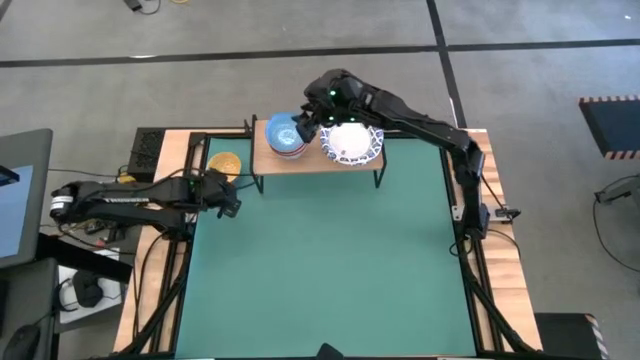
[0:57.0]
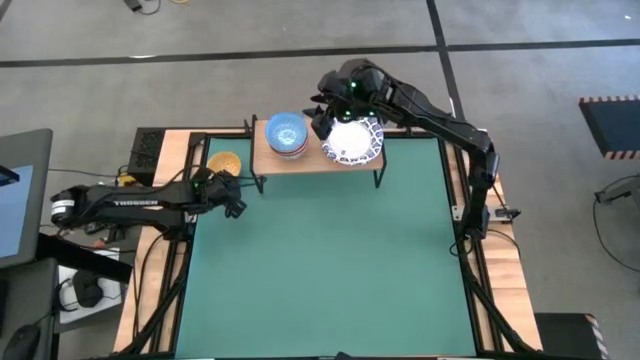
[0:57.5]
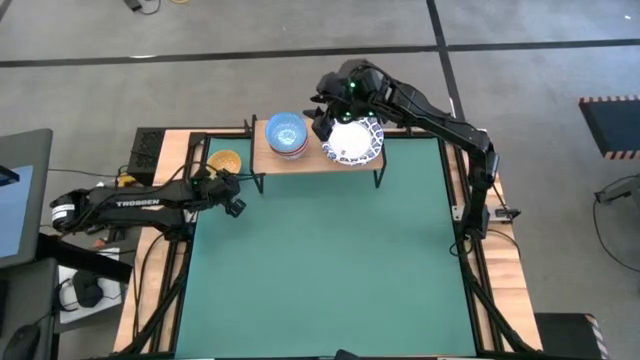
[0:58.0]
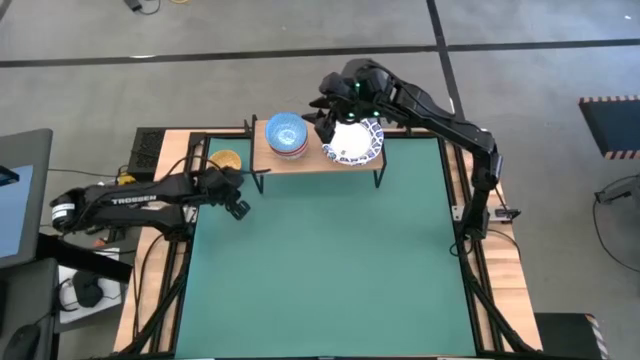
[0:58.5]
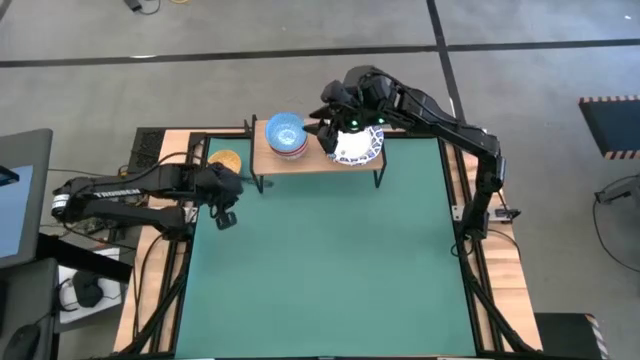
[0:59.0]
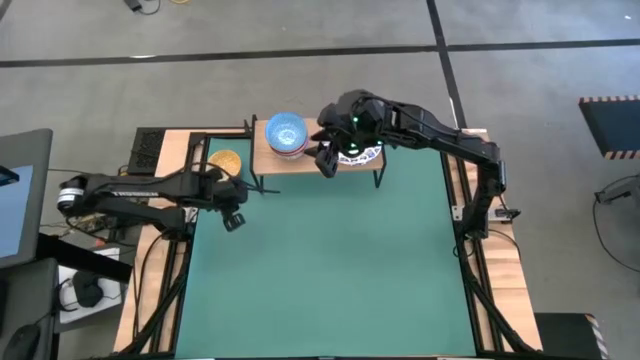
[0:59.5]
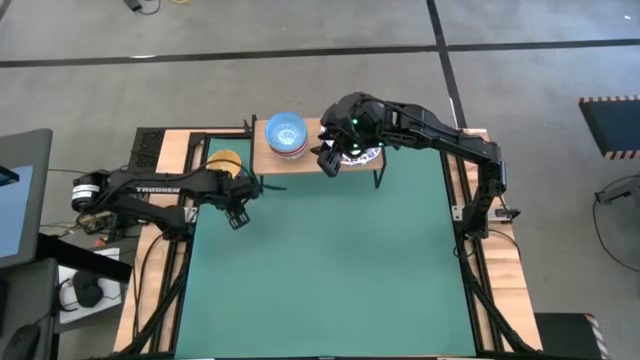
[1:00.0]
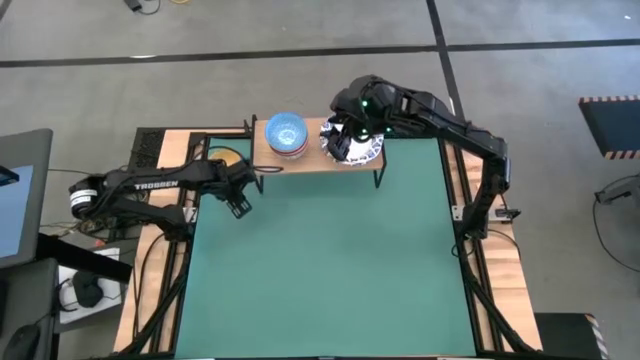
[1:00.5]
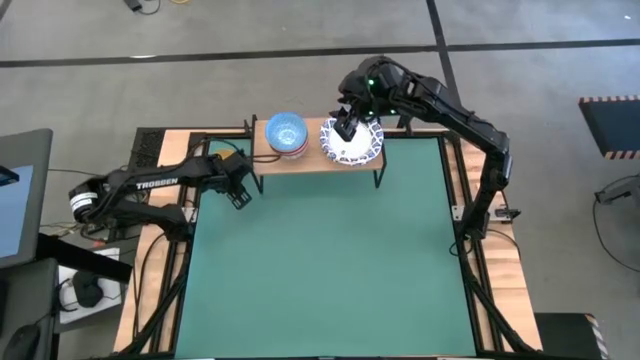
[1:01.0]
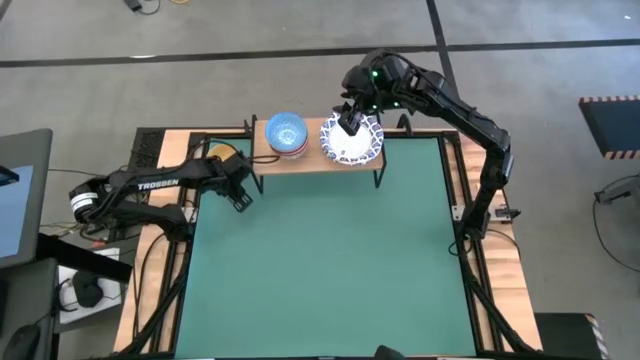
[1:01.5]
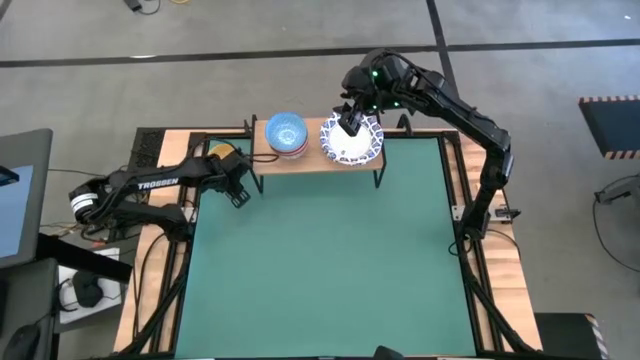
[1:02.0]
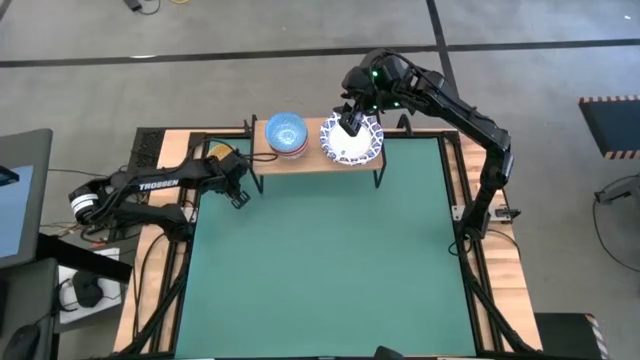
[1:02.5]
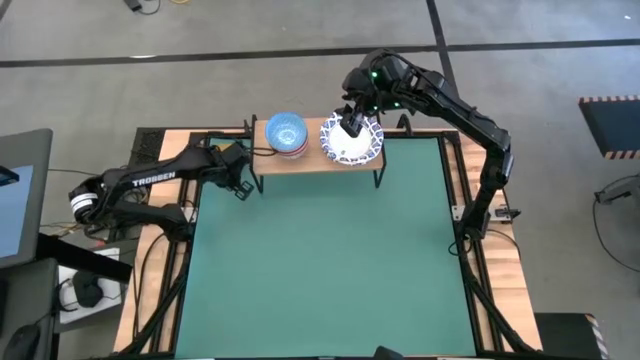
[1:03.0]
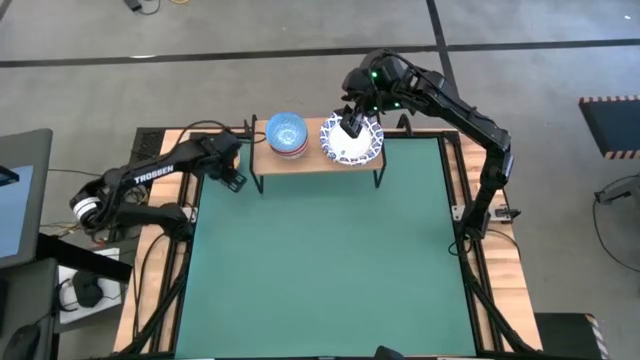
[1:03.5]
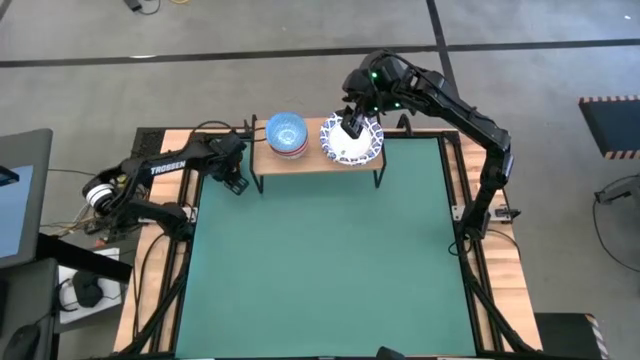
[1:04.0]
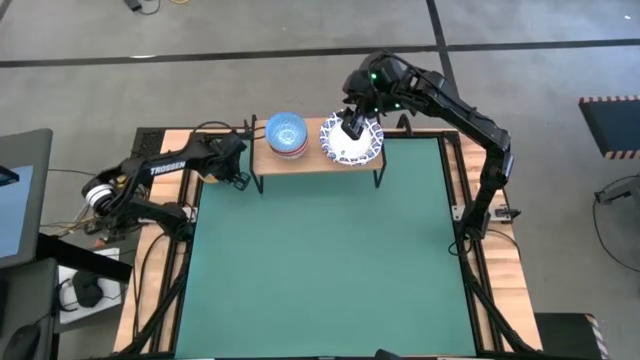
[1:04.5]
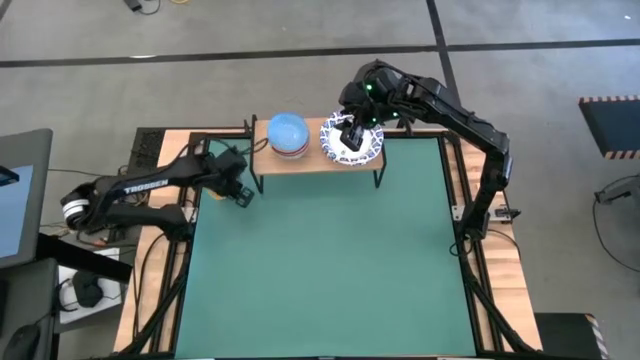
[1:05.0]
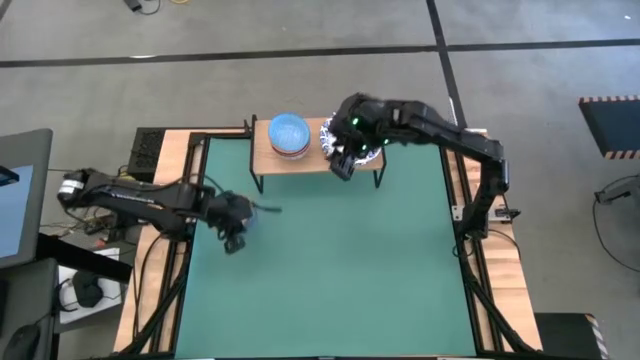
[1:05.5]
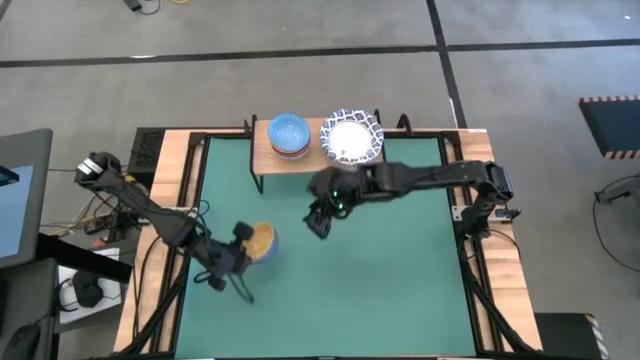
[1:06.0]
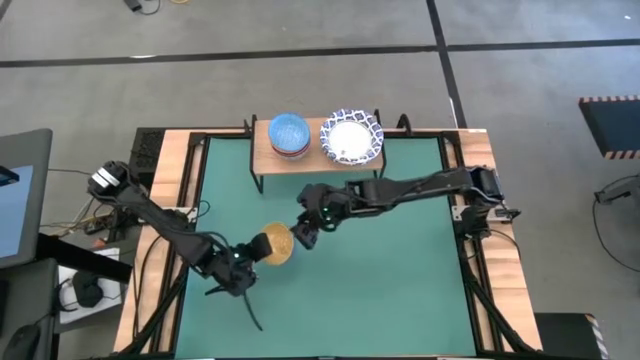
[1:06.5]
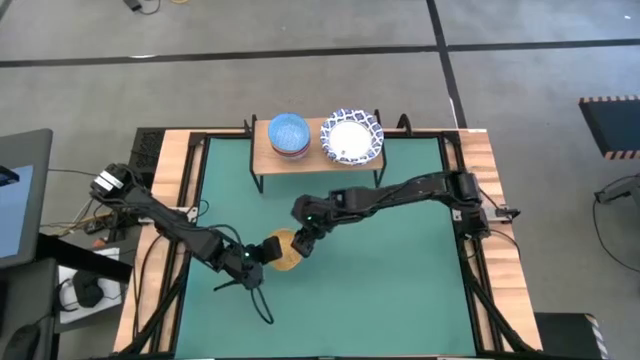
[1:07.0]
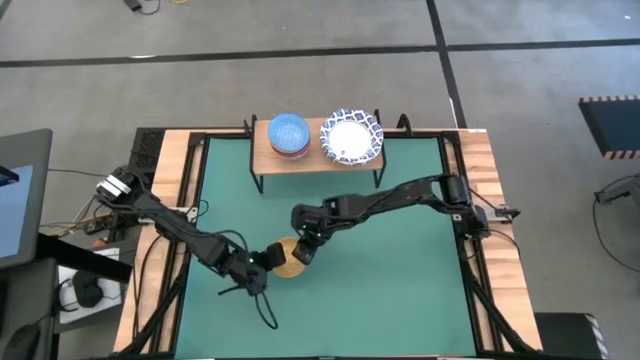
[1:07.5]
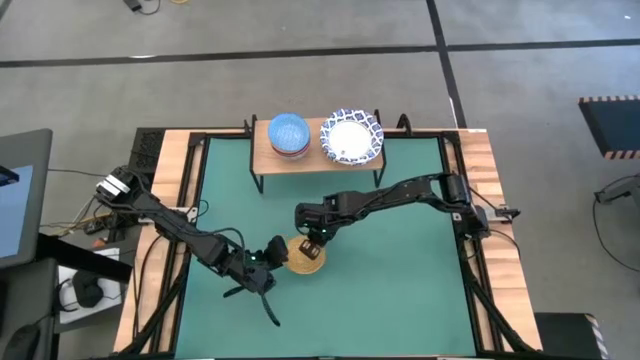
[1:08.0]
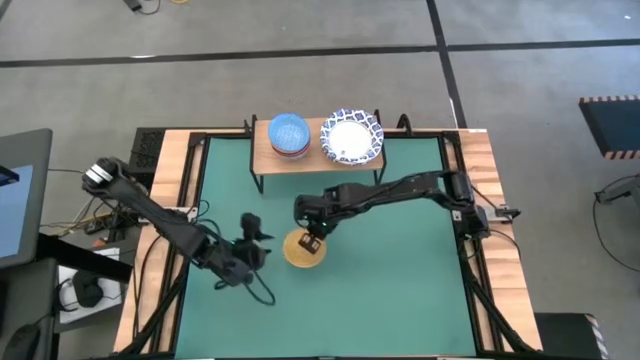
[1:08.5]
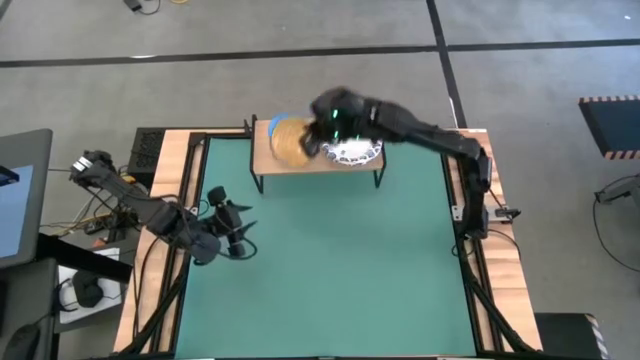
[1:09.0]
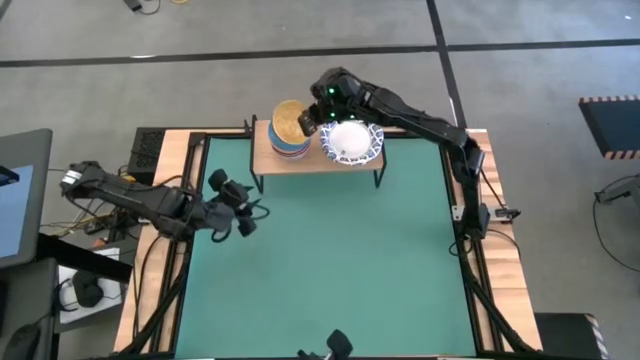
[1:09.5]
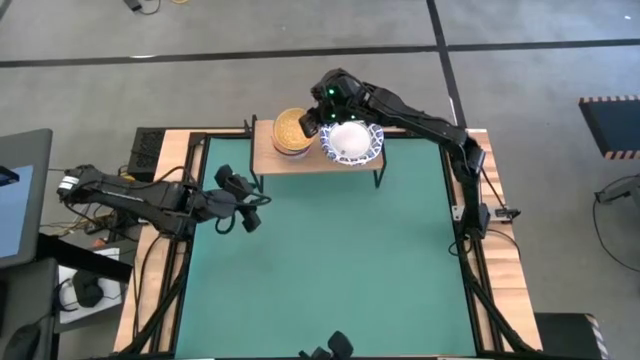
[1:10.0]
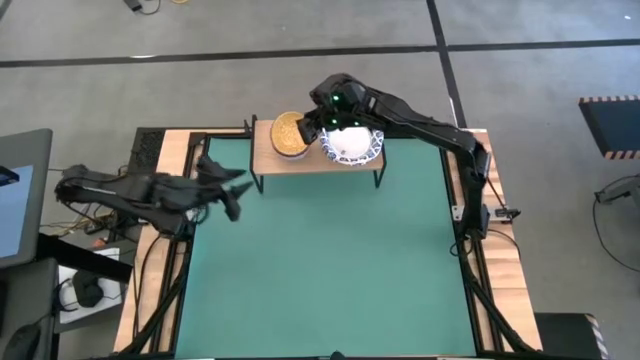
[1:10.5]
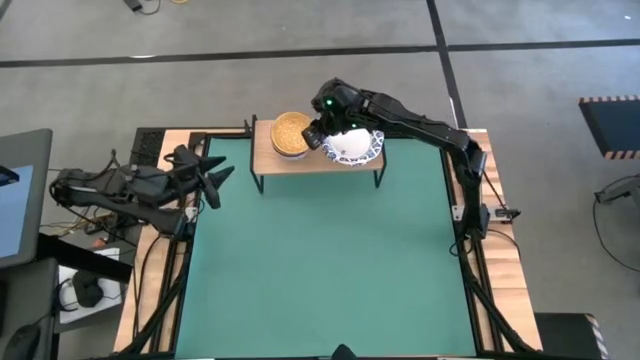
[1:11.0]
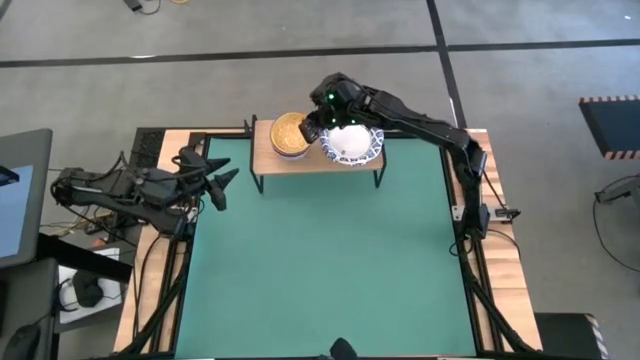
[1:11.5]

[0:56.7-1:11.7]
Task: Place and stack bowls onto a shelf
Stack the yellow bowl on top of the blue bowl on the shelf

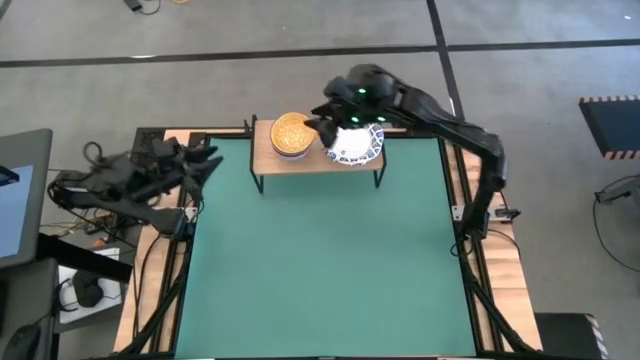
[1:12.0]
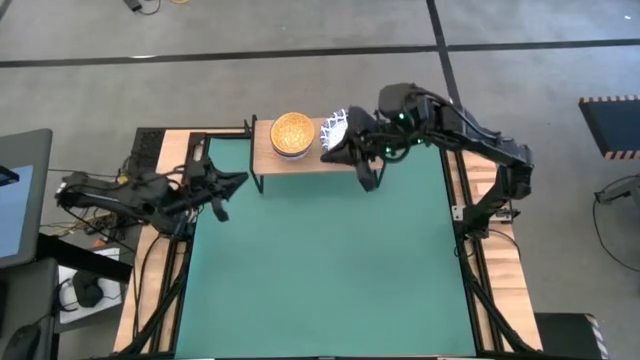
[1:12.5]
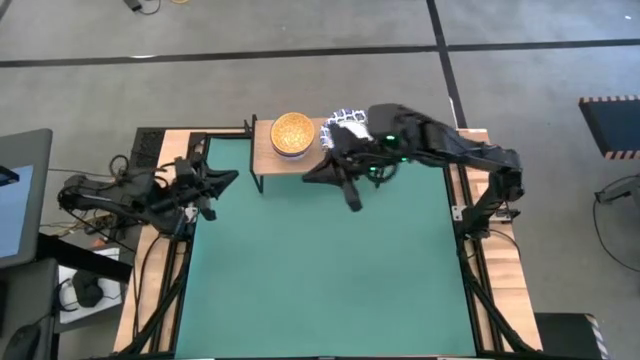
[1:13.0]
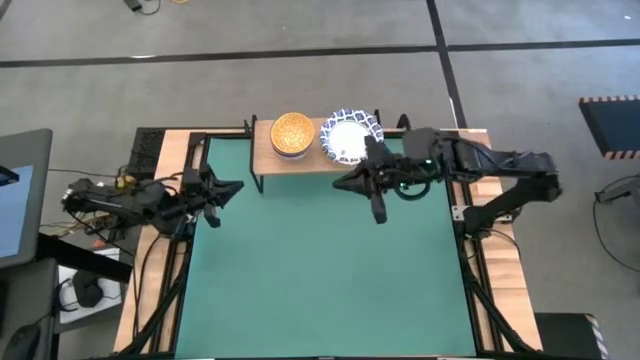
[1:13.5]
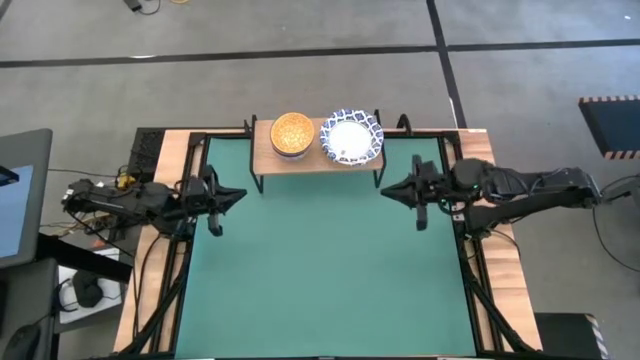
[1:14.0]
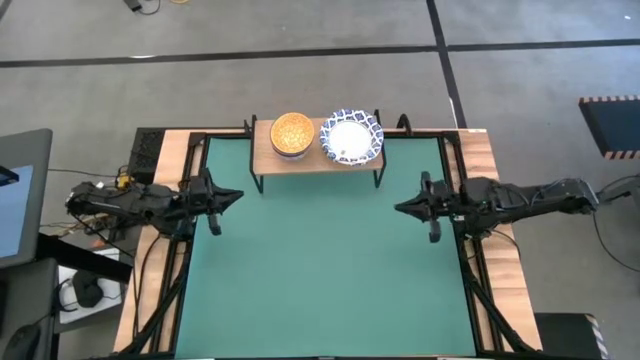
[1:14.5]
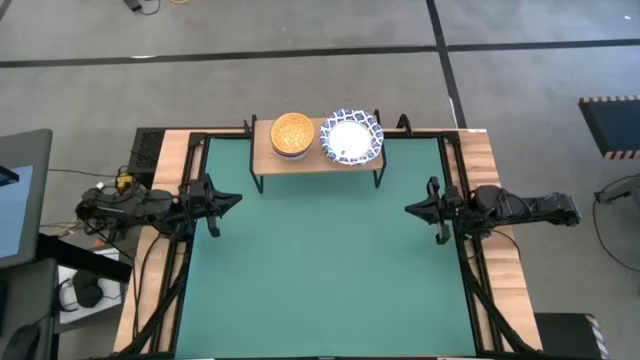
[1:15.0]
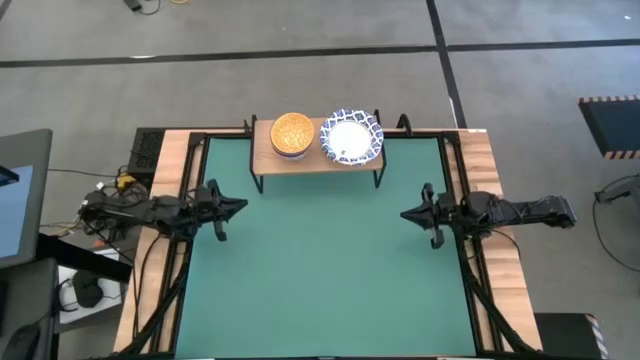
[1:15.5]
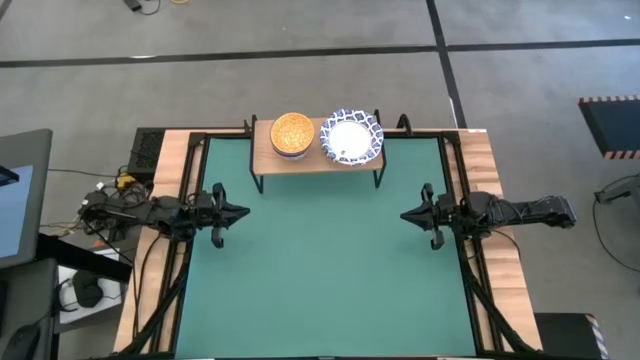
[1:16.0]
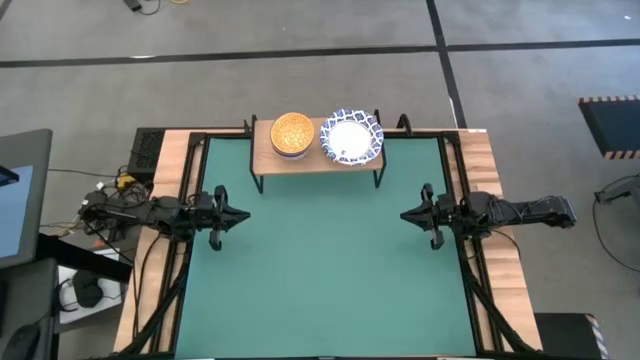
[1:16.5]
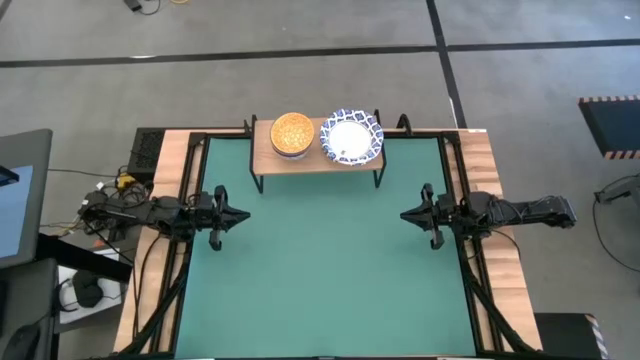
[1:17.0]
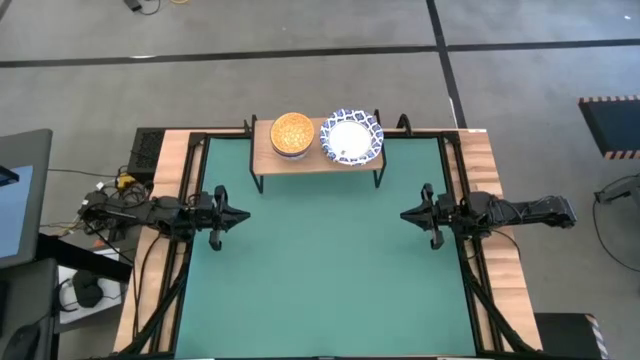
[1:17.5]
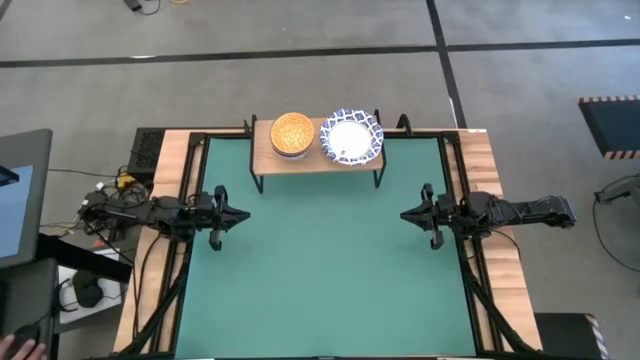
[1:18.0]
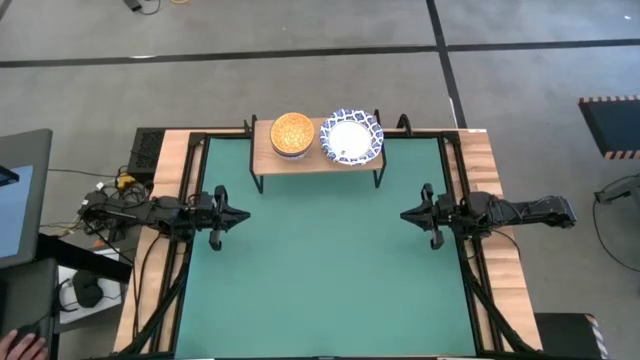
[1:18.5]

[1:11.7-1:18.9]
Return to Home Position

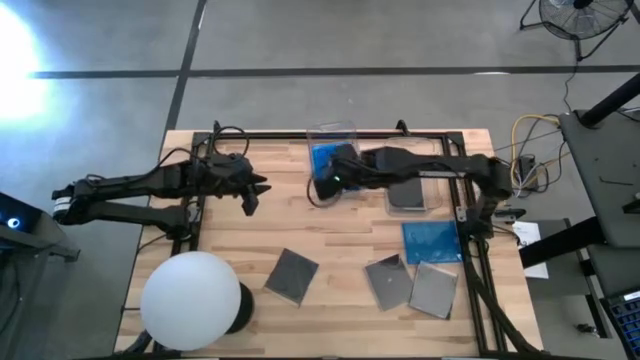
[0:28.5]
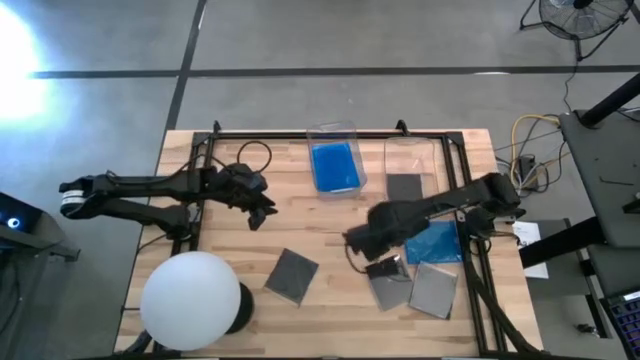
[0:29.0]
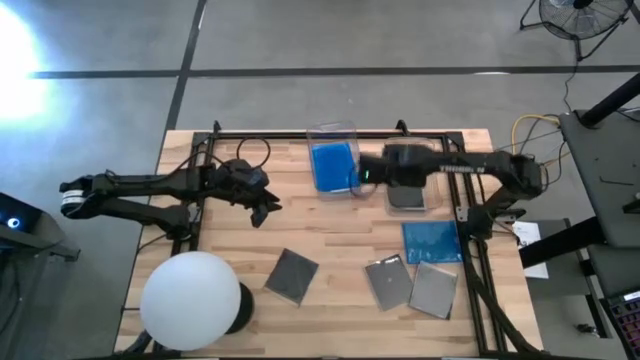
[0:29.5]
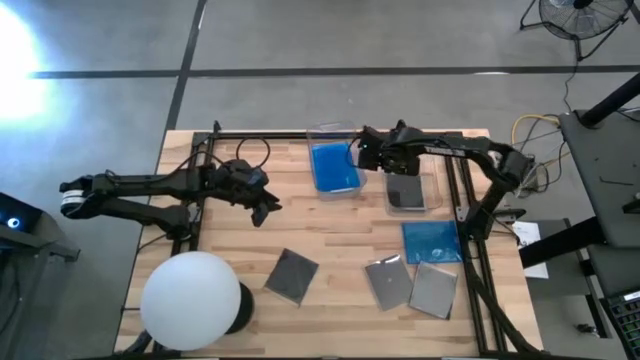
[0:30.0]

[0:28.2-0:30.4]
Task: Pick & place jewel cases by type
Adjust the right transparent bin
